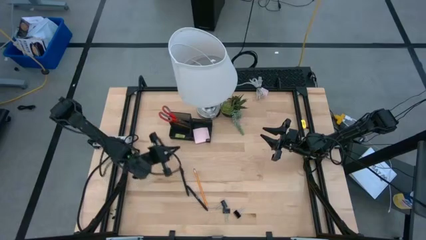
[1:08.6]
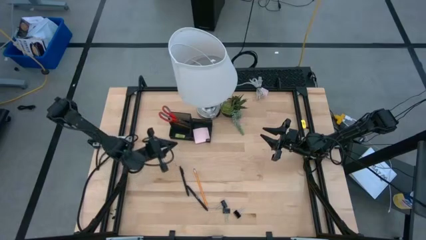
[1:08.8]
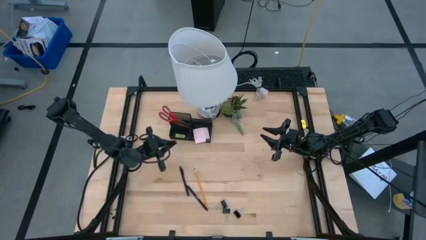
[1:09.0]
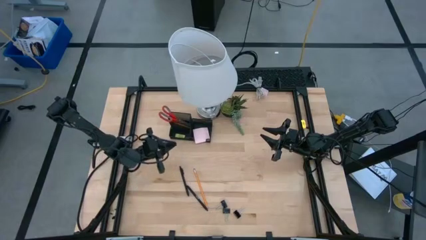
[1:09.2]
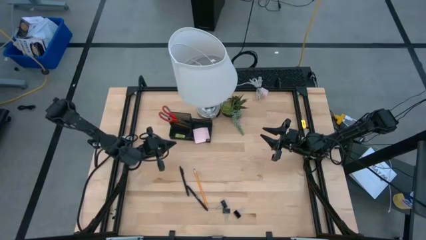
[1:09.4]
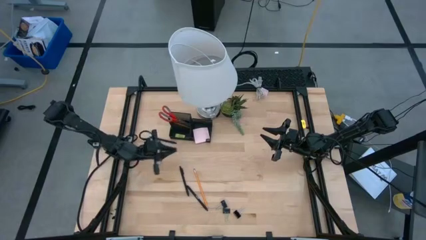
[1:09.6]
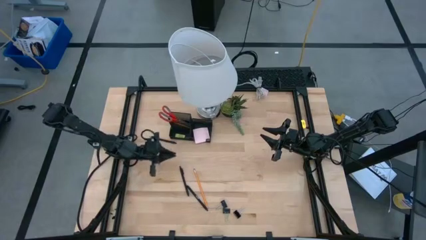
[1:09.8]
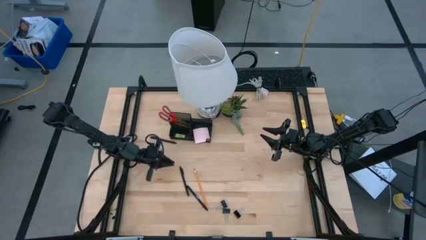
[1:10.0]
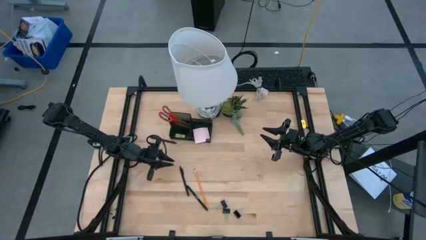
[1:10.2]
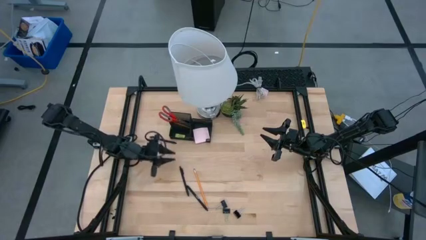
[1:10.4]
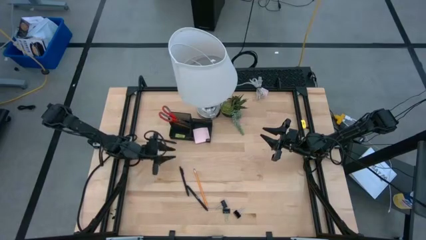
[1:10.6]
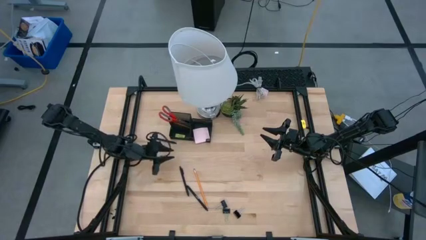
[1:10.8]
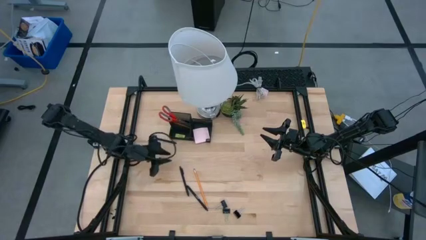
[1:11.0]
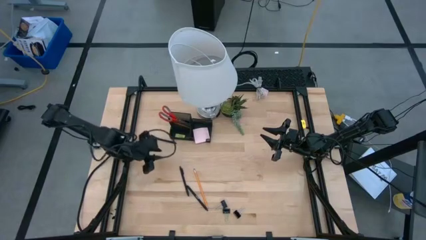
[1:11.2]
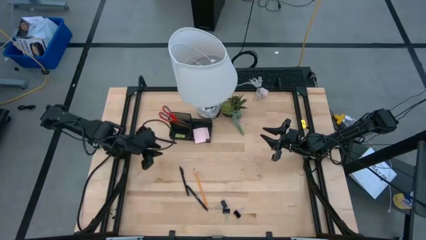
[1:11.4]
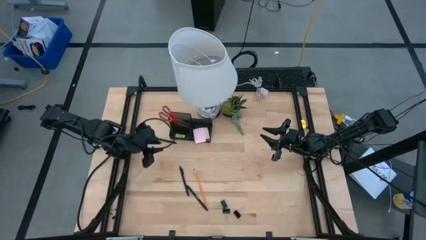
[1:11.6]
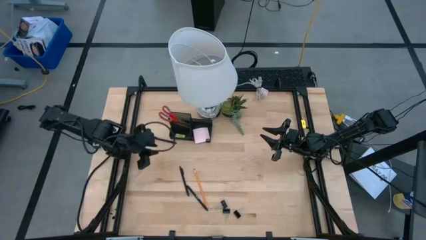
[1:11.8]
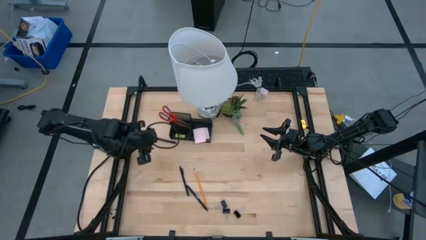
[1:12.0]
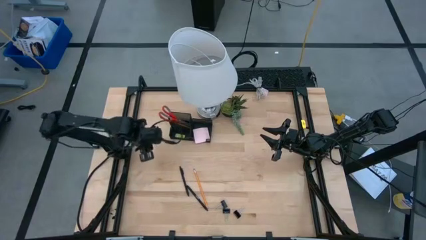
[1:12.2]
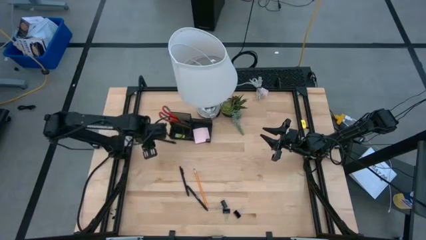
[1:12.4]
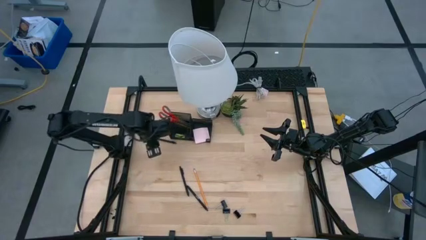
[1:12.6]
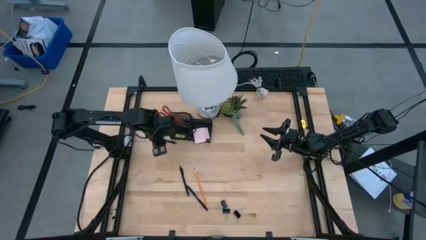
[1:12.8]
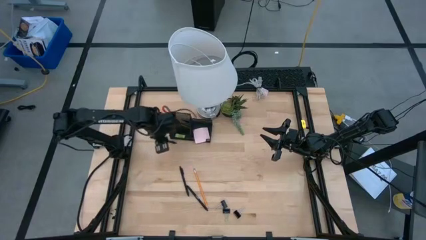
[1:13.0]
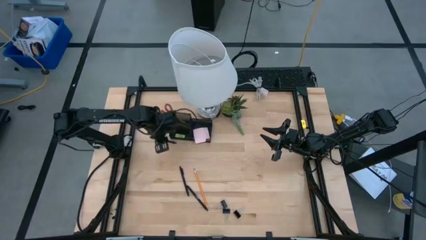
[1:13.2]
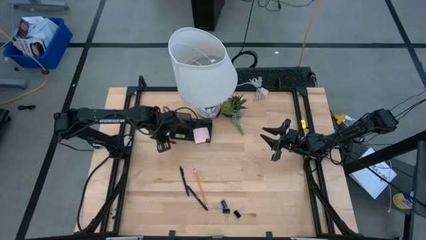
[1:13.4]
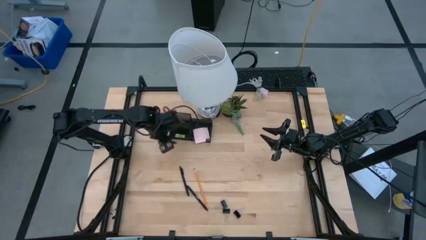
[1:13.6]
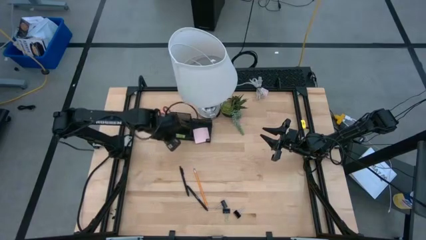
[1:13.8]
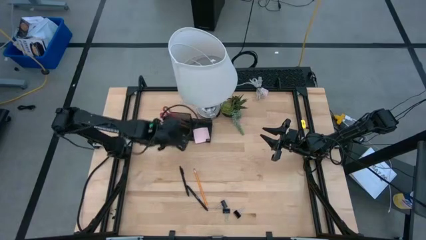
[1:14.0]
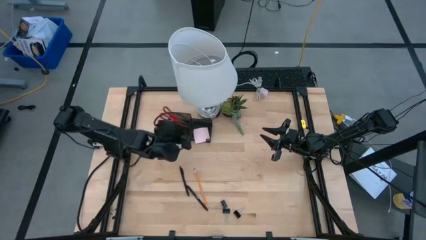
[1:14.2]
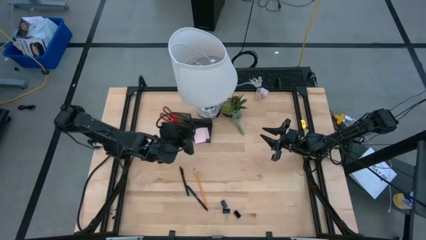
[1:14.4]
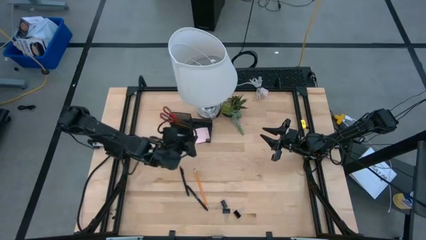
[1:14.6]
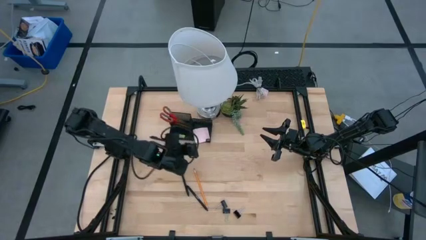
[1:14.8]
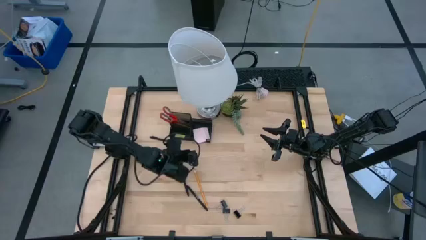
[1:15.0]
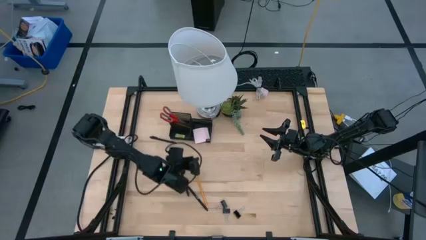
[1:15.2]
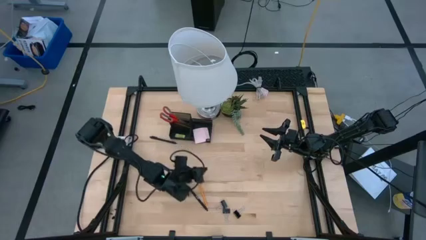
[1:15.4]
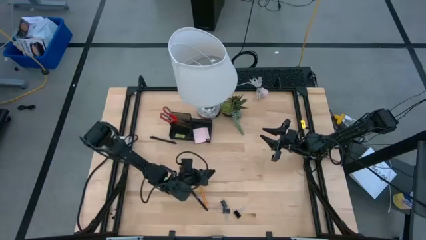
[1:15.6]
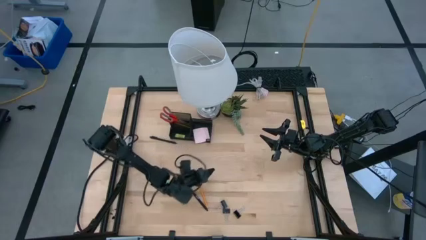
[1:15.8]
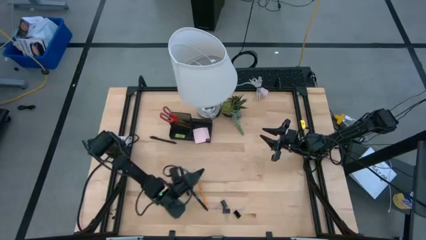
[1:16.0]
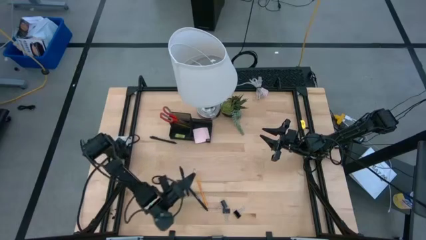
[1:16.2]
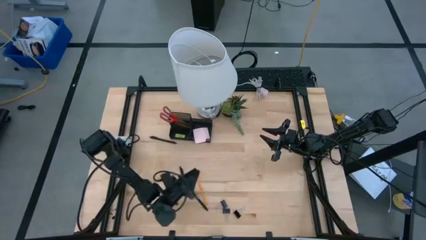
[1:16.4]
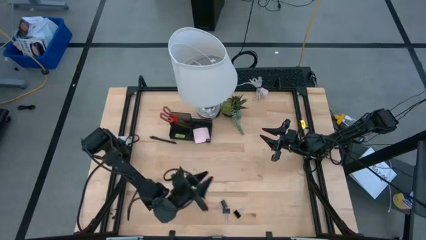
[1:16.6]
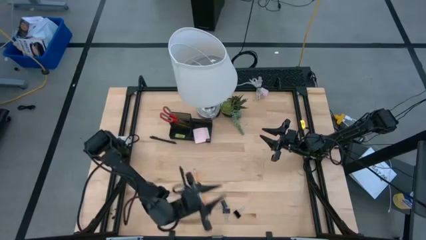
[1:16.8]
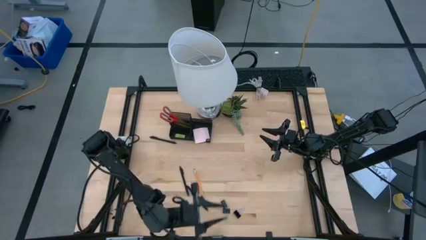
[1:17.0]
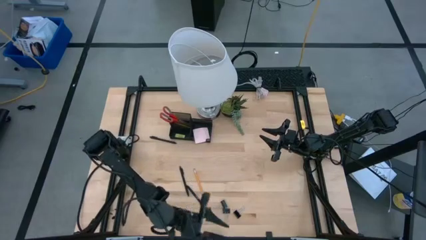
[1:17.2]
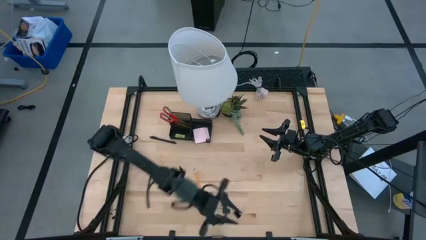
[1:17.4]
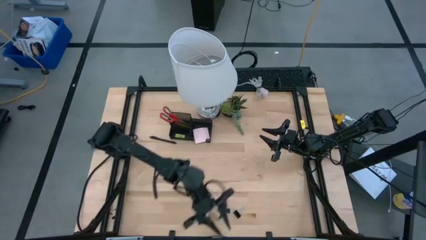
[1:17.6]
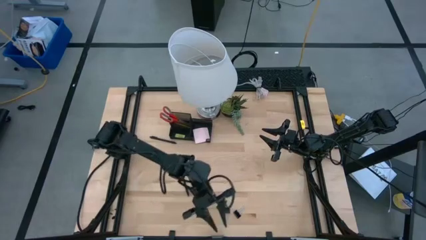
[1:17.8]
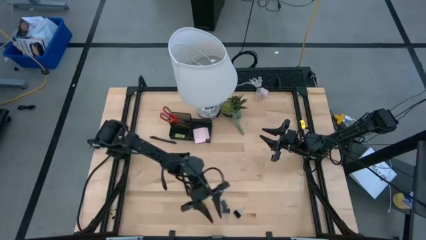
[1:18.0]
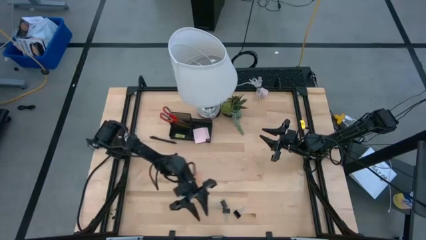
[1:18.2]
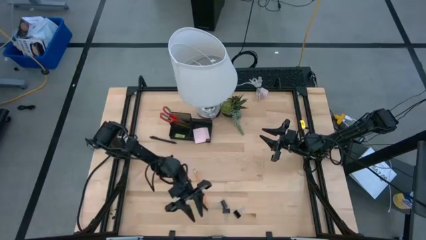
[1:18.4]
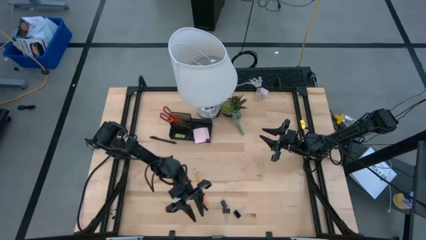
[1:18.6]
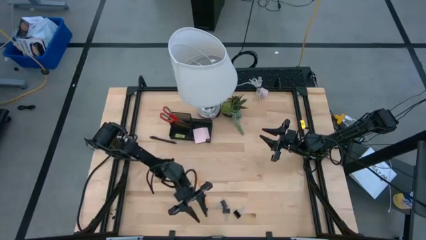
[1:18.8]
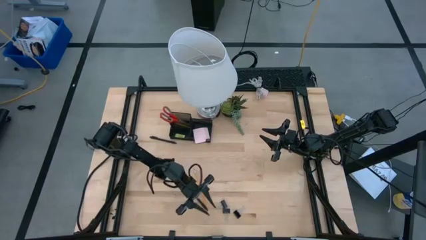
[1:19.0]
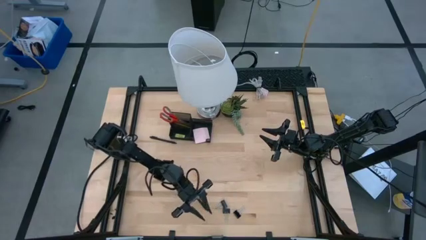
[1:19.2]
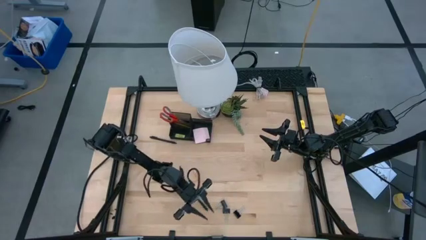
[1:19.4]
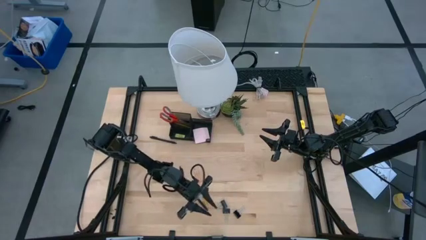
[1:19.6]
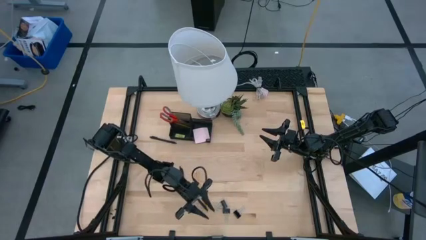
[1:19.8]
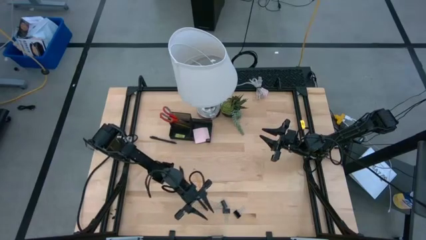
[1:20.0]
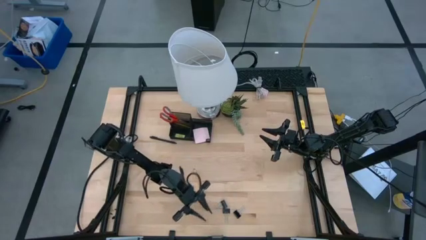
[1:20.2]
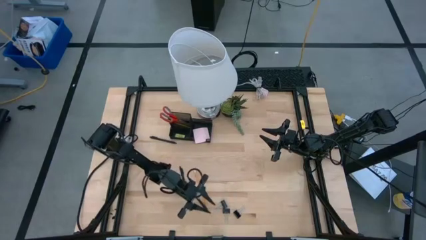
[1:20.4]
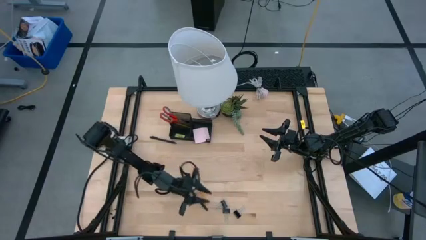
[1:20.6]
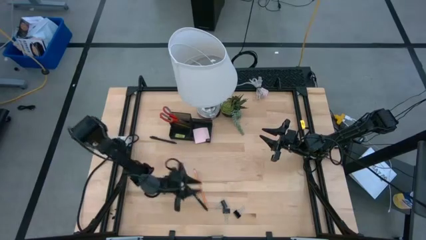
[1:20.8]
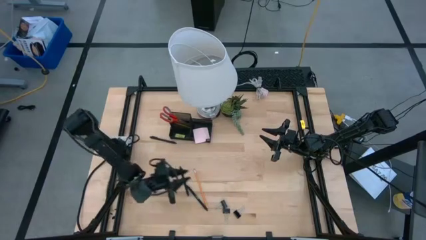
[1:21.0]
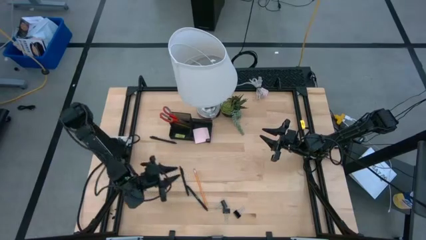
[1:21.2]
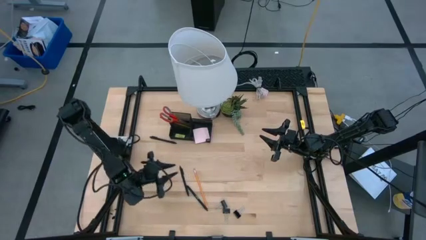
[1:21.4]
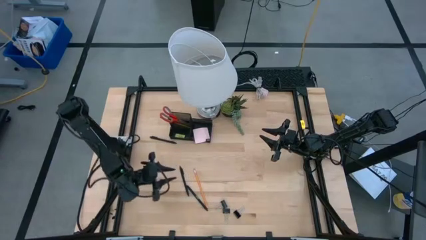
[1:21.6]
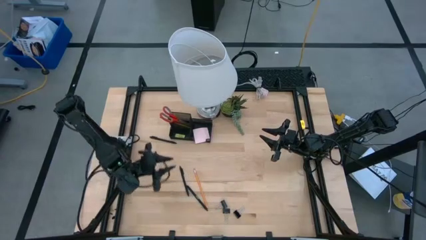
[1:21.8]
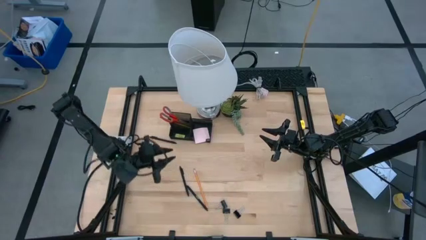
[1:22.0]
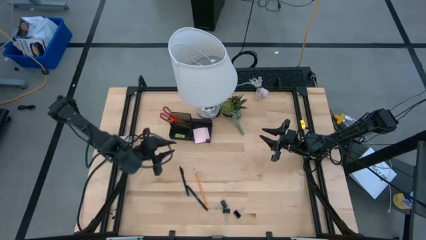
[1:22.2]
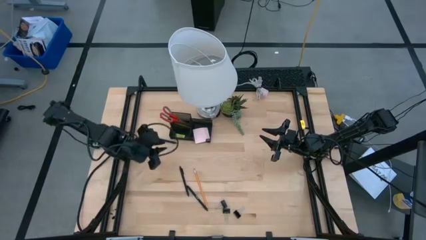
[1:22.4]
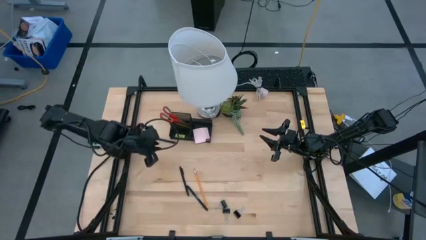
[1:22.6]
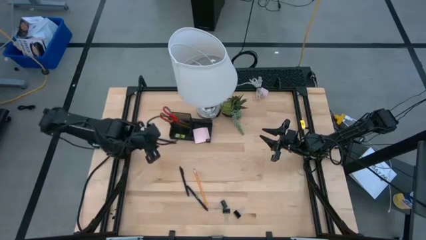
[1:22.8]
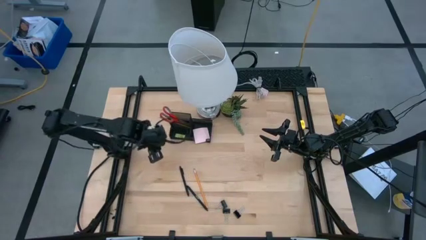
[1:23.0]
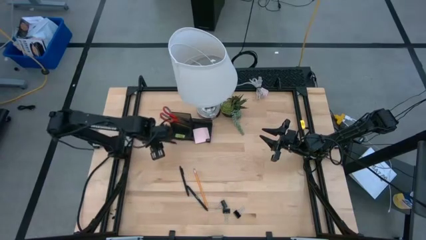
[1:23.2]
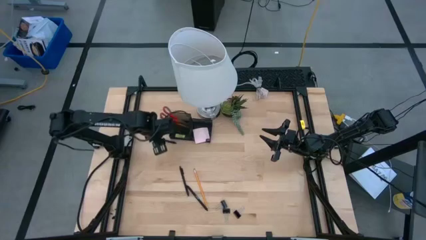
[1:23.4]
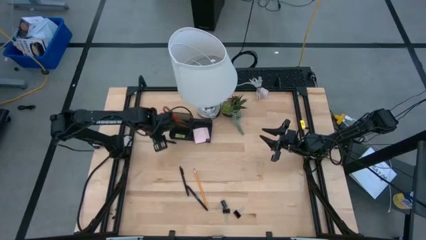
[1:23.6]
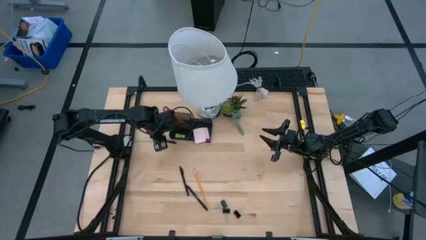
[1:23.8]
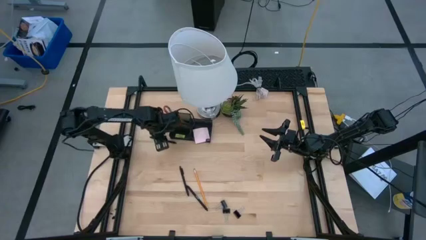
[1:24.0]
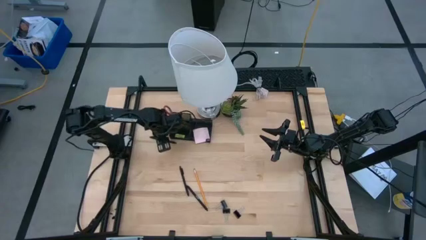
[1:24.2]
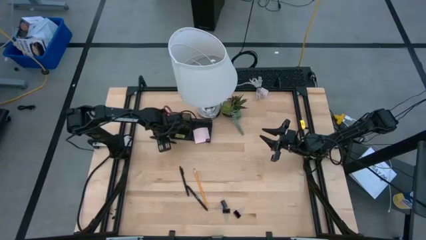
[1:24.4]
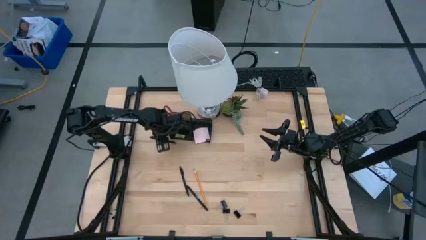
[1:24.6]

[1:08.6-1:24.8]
Task: Pick and place office supplies into organizer
Put the black pen into the black desk organizer

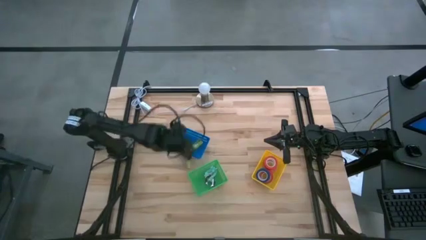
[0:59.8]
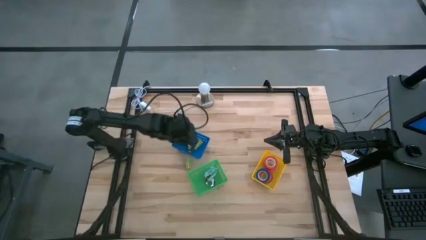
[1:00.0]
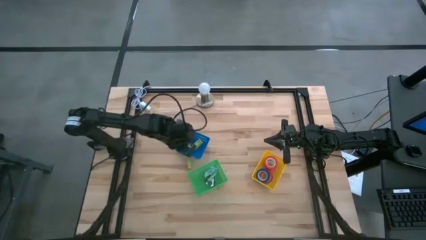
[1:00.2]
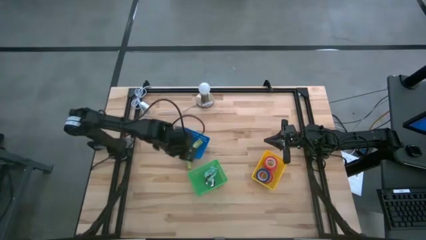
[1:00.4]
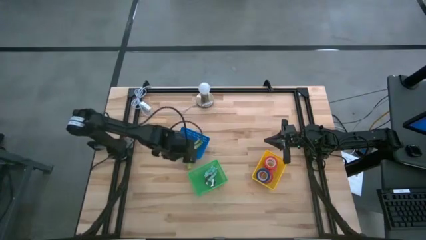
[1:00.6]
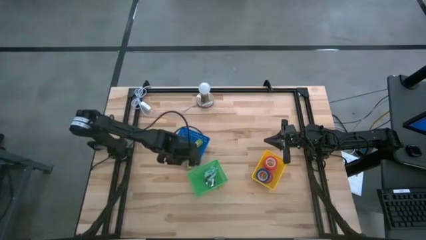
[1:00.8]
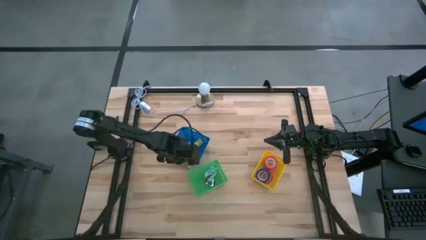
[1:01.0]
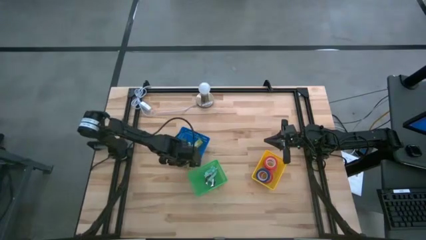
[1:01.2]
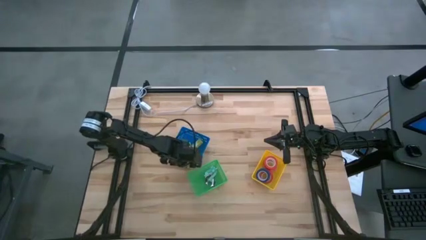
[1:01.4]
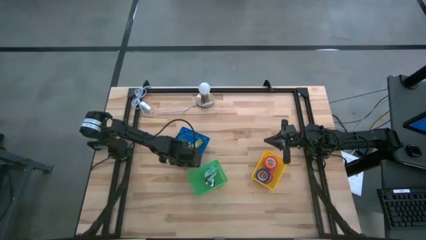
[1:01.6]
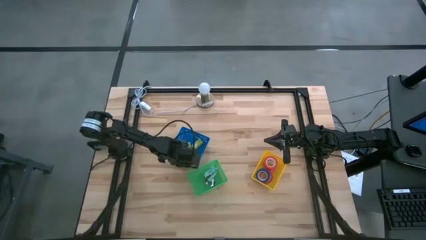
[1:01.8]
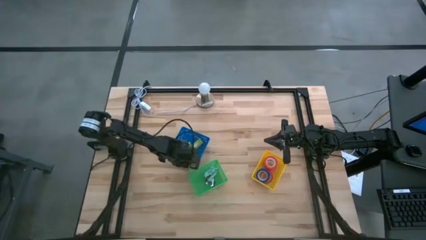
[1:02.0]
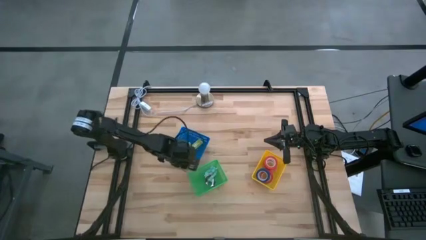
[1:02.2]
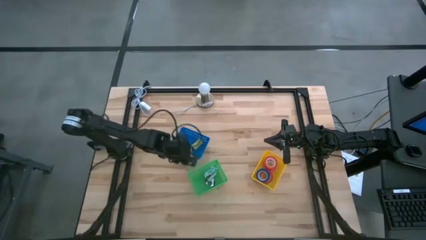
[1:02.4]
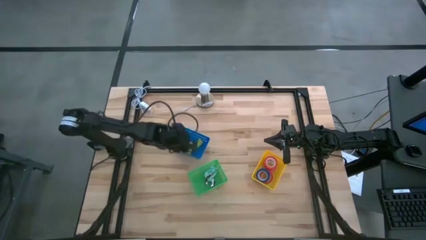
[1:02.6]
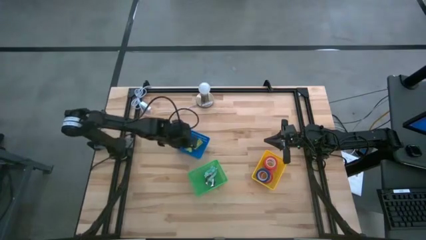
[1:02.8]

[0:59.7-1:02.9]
Task: Pick and place Stapler, Stapler remover, tape
Put the green staple box into the blue bin
